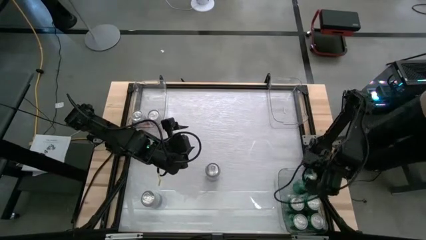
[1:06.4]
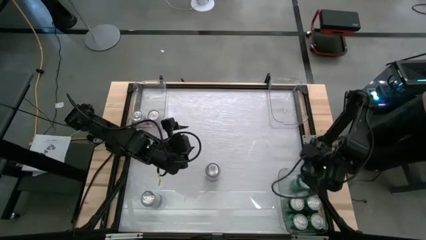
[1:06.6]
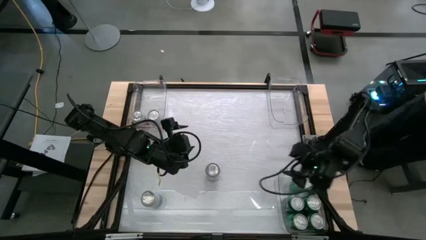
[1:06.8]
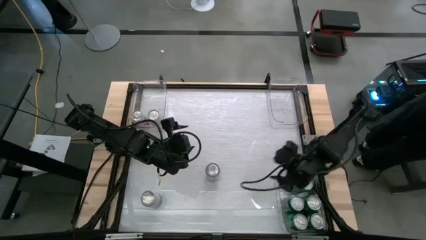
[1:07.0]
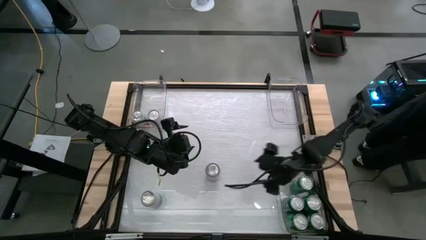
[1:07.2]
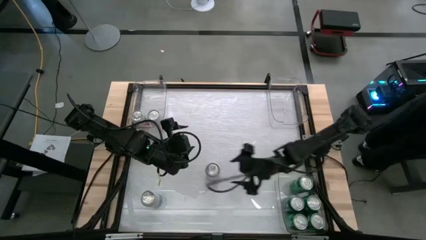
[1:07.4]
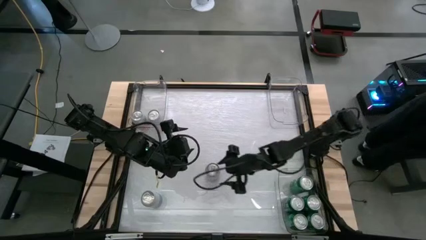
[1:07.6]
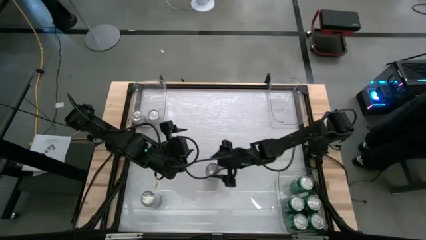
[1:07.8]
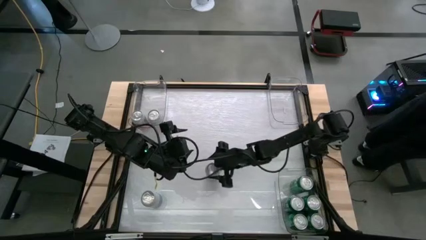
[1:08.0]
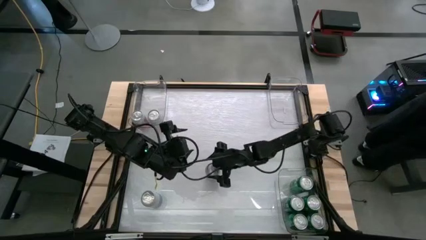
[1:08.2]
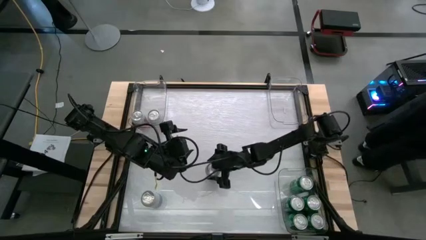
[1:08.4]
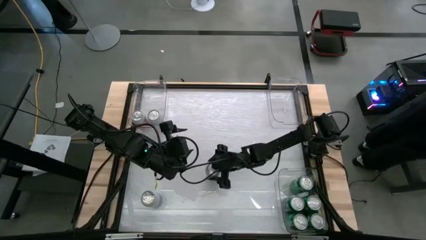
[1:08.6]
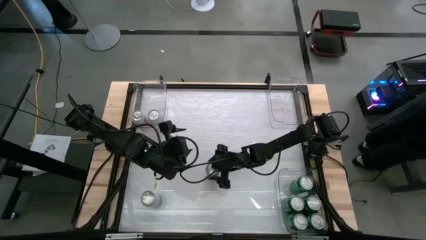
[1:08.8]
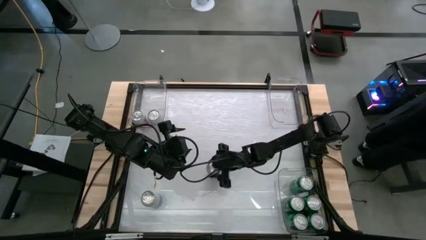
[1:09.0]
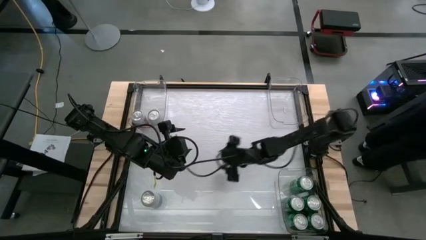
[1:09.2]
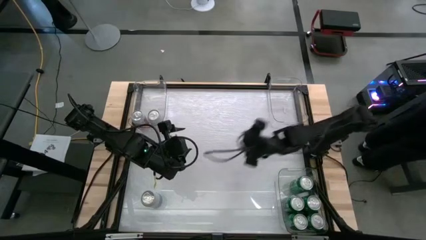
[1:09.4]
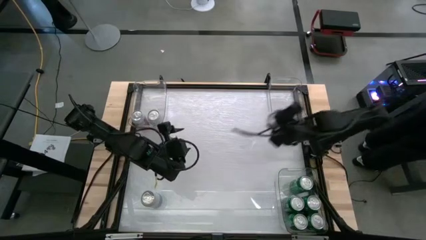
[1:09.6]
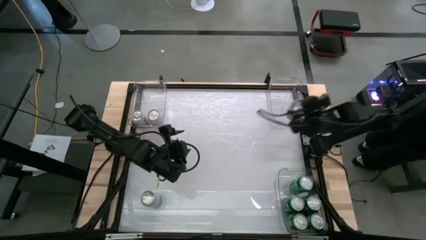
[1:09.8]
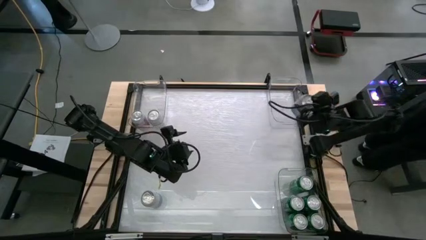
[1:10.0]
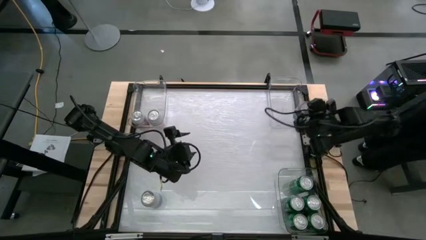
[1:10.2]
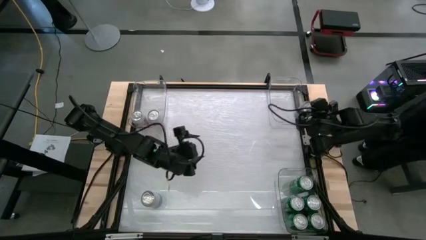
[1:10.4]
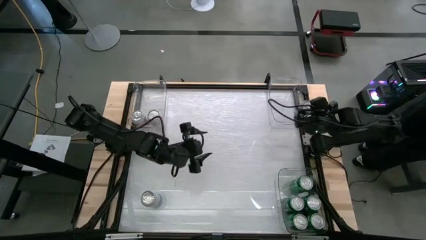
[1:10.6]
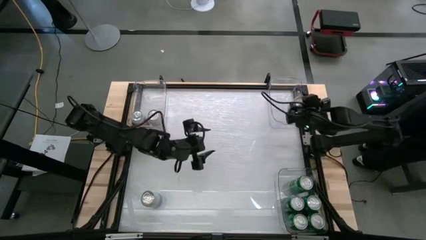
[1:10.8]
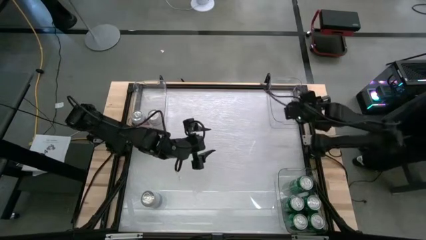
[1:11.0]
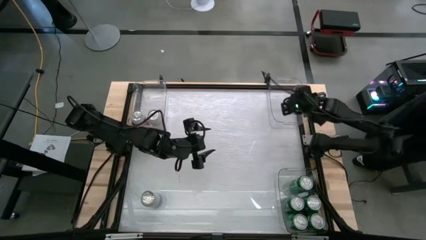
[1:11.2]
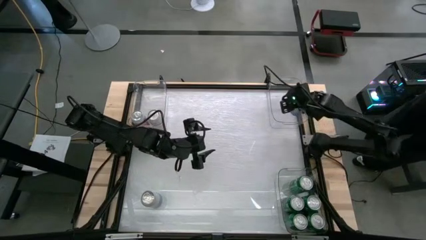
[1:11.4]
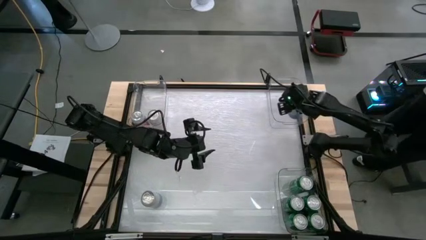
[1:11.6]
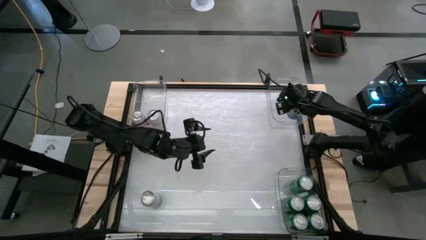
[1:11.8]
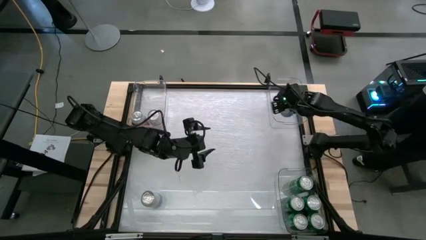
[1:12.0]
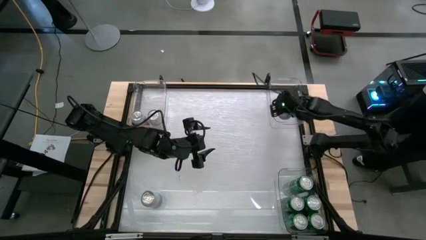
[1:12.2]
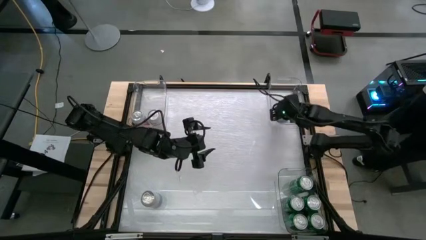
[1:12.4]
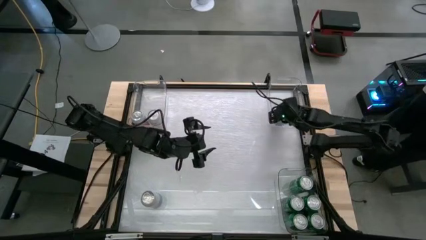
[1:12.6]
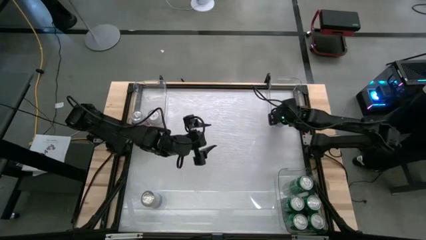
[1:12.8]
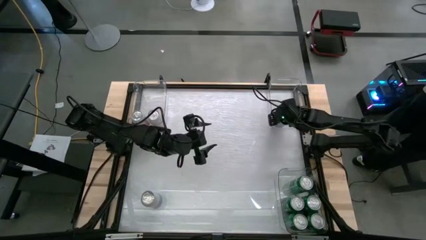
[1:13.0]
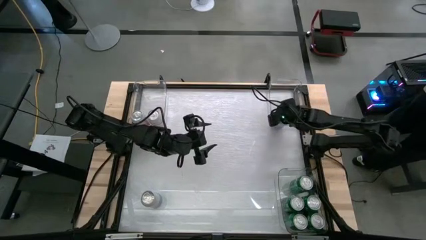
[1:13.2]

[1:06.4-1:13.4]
Task: Sort soda cans
Put the blue/white soda can into the right transparent bin

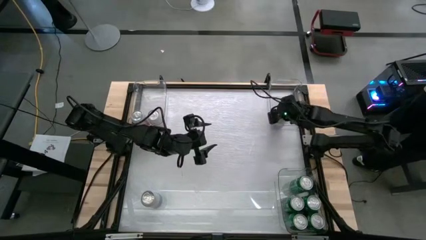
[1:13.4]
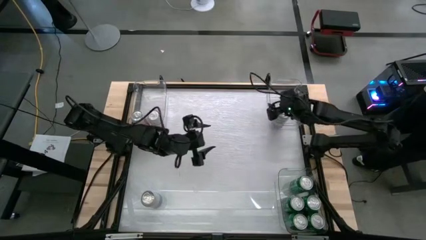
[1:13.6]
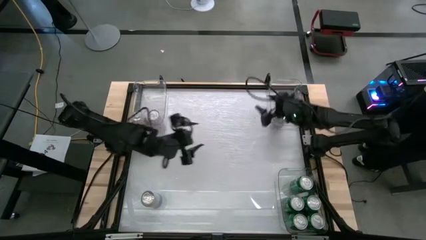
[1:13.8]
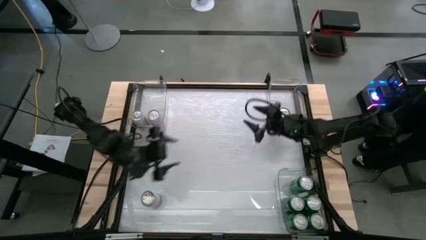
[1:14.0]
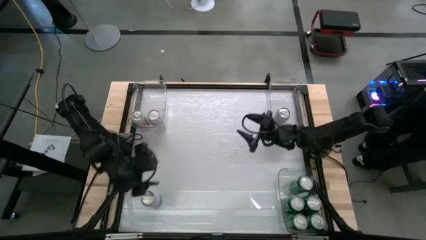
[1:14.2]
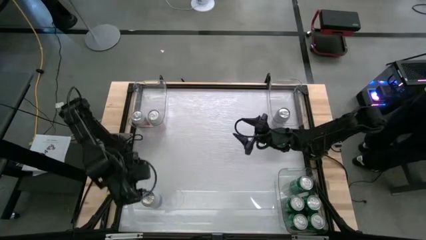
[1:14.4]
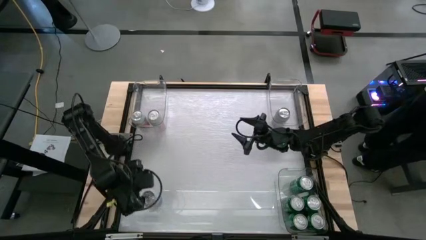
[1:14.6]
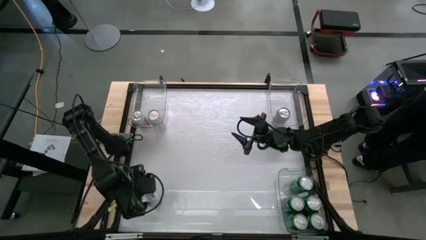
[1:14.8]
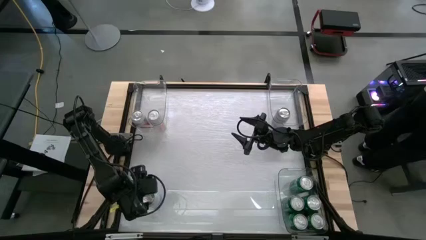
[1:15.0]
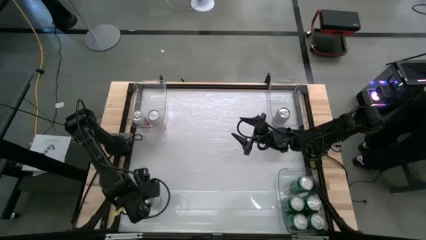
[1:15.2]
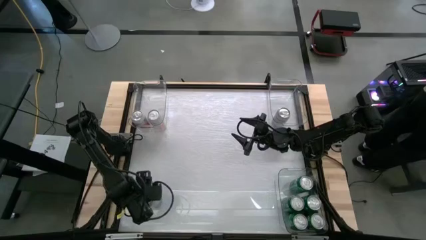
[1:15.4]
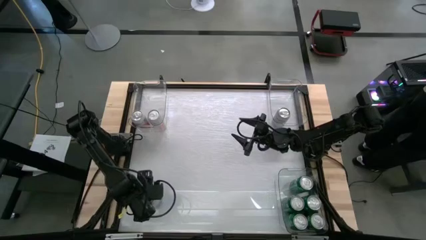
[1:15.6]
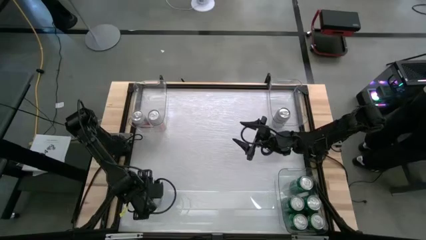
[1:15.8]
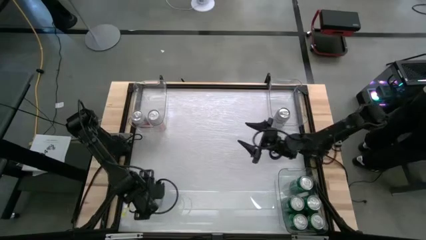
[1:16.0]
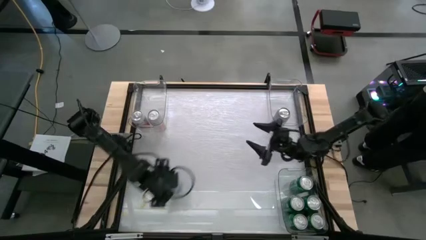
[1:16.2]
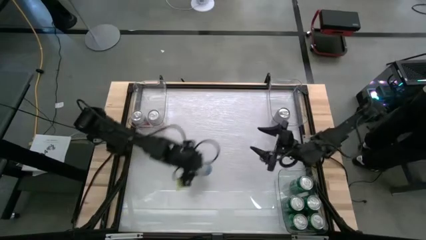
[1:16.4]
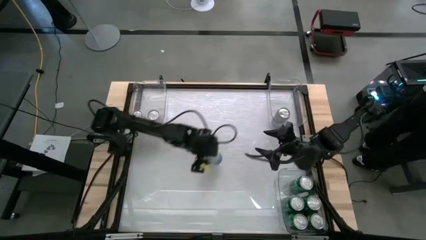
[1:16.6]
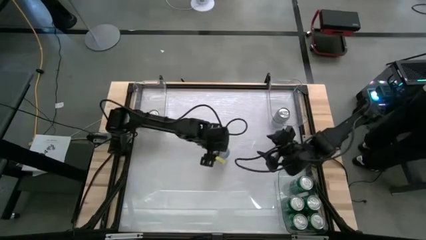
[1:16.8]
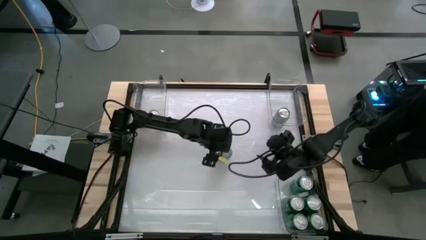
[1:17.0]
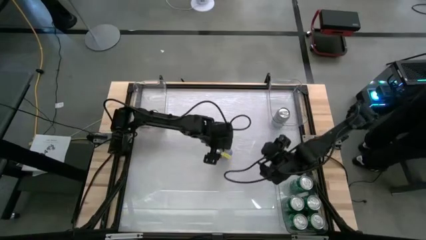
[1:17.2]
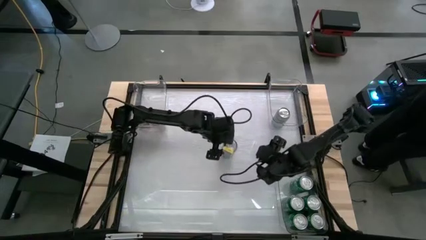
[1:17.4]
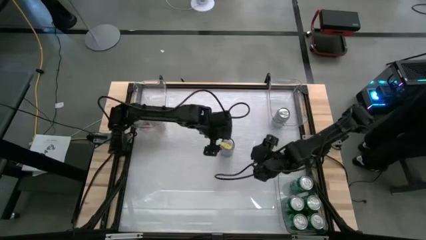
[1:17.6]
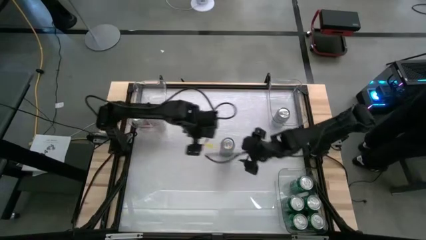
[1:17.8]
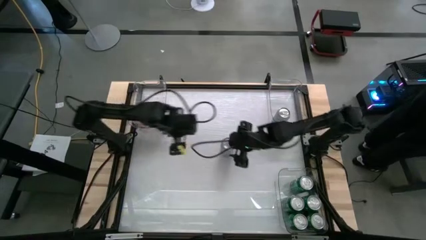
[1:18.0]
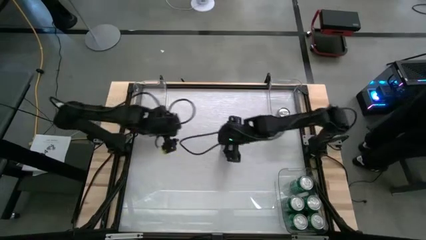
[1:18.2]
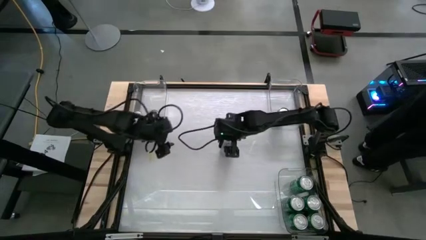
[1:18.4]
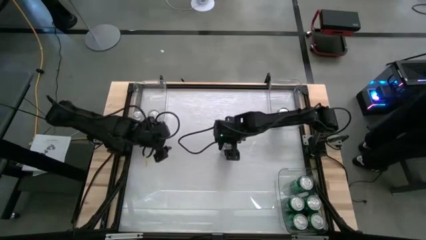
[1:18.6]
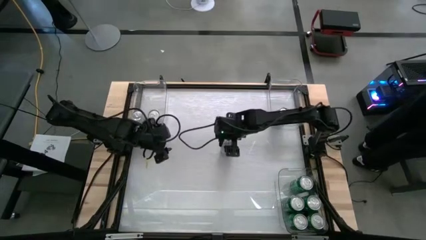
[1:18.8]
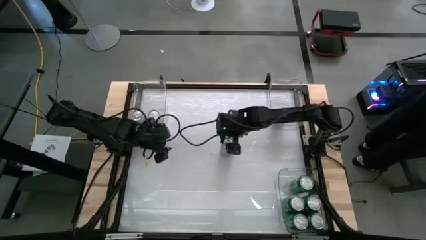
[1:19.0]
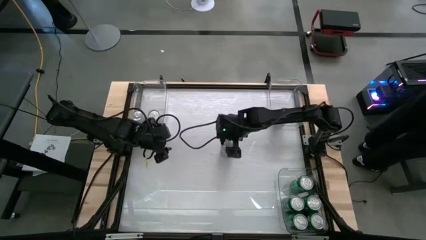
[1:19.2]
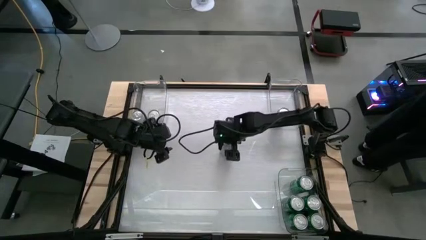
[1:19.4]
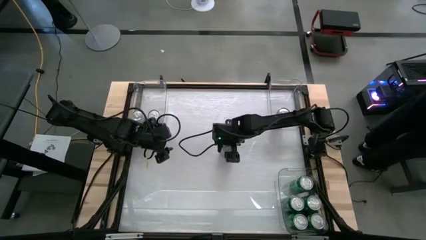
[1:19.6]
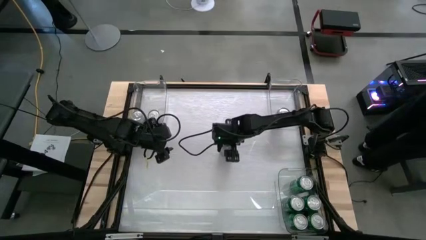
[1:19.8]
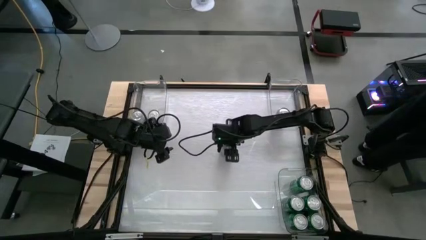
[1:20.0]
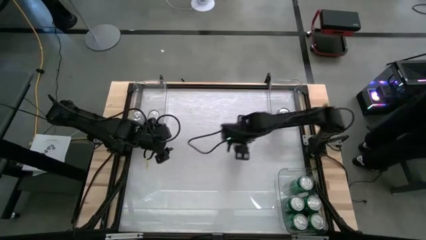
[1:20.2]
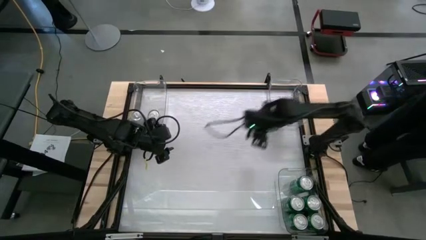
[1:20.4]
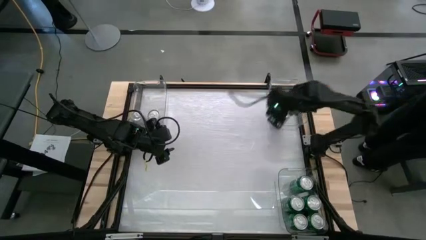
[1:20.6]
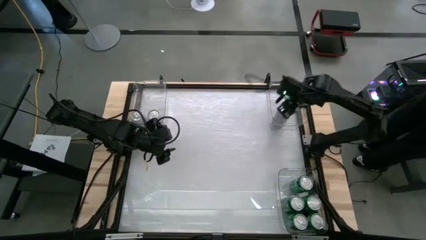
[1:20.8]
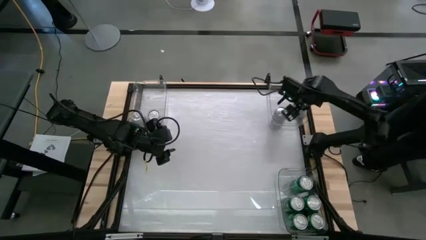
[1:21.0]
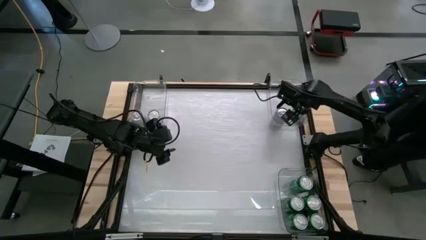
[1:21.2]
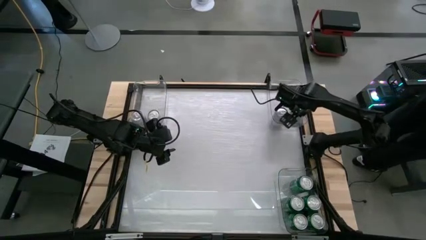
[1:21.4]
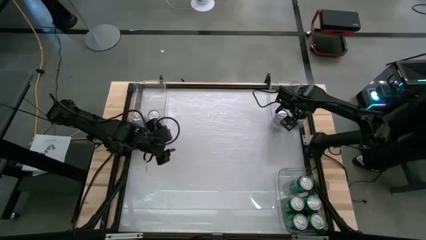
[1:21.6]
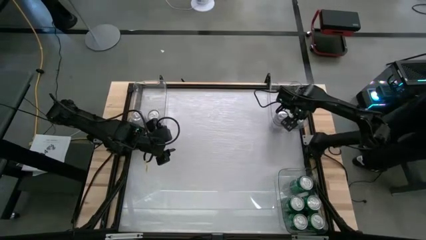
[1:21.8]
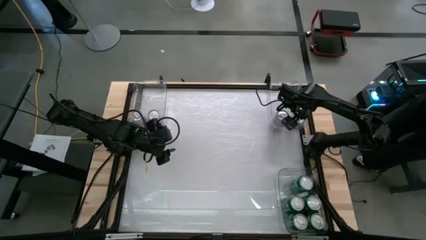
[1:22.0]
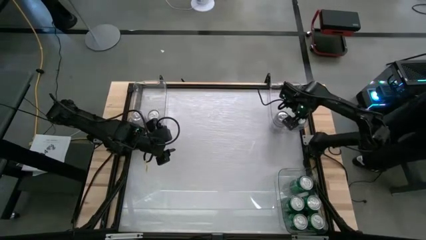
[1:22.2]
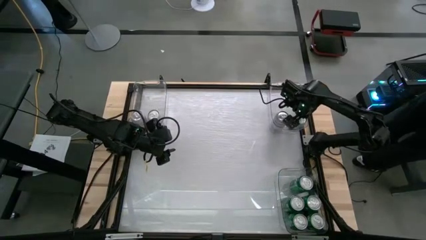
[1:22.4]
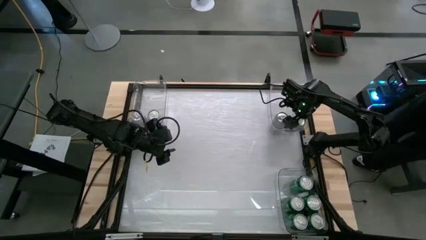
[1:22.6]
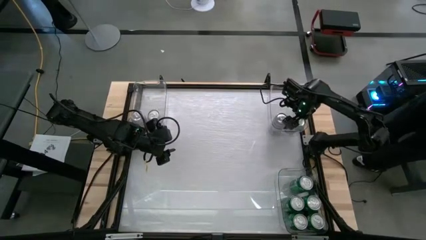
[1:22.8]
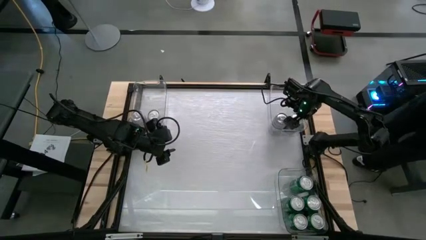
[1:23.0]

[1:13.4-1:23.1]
Put the blue/white soda can into the right transparent bin
